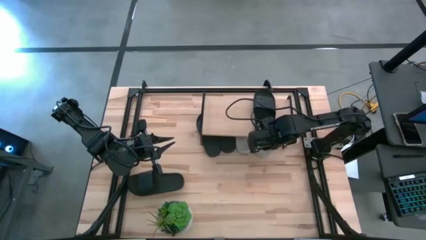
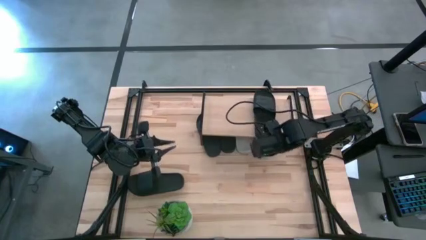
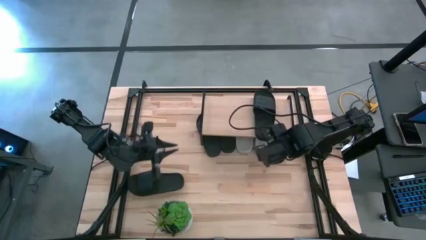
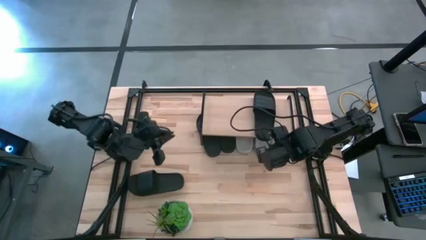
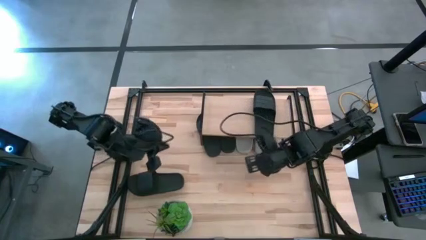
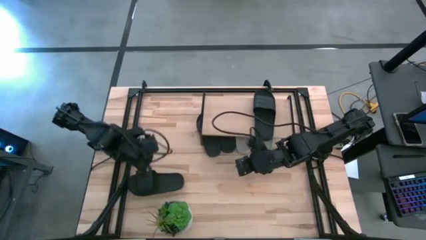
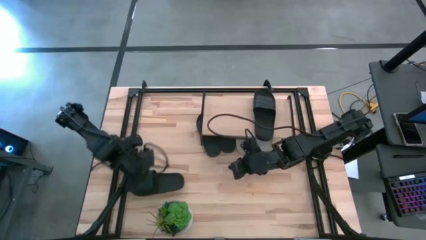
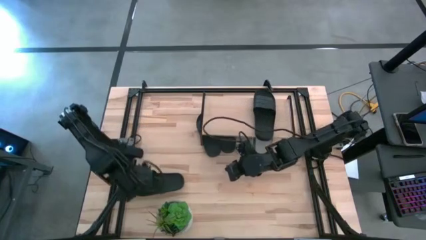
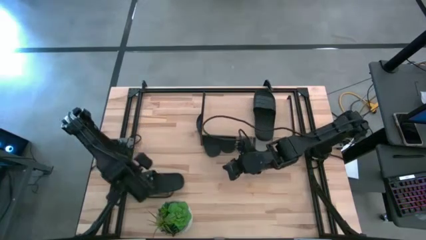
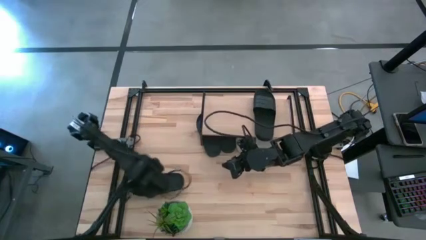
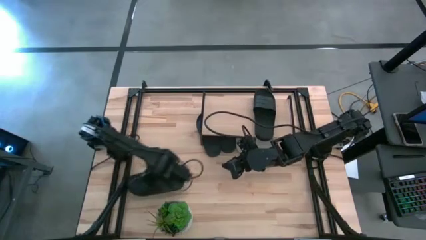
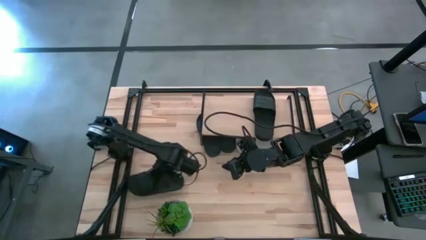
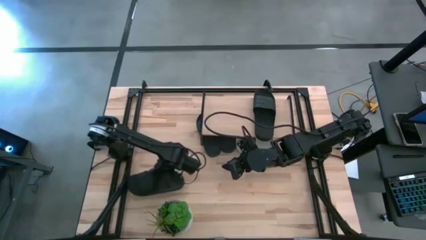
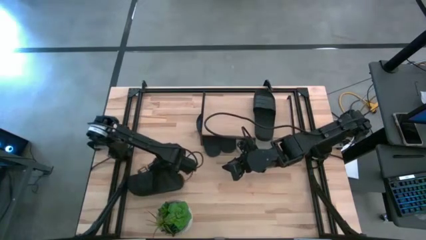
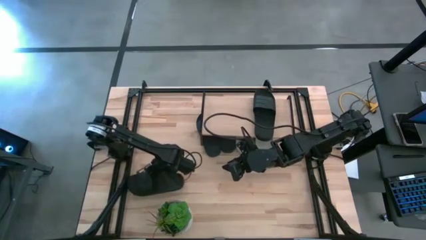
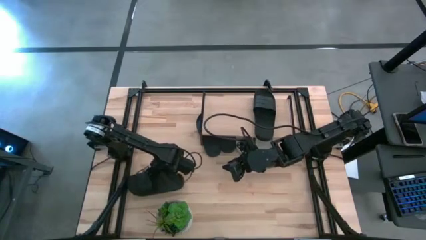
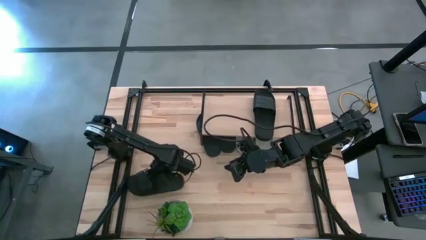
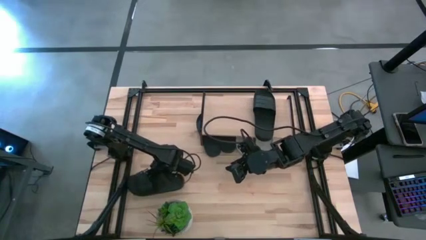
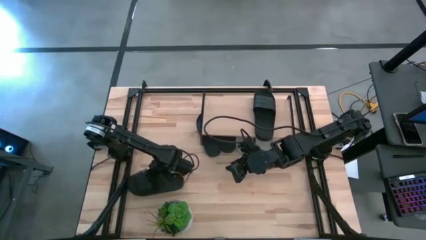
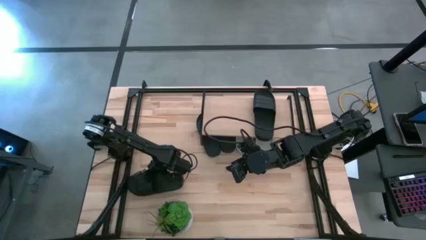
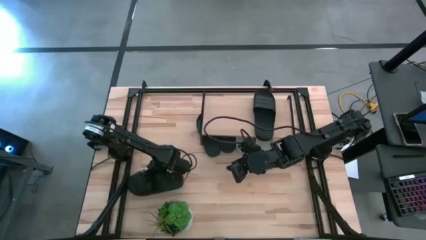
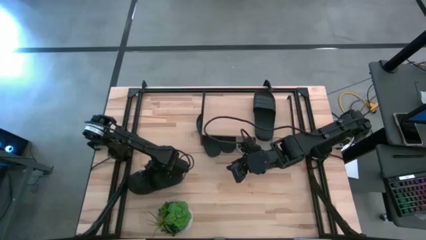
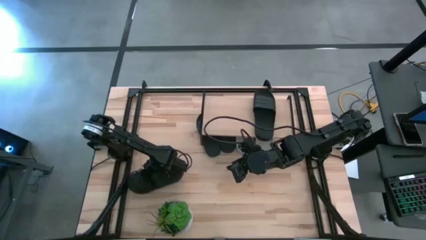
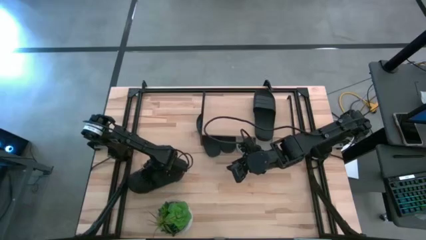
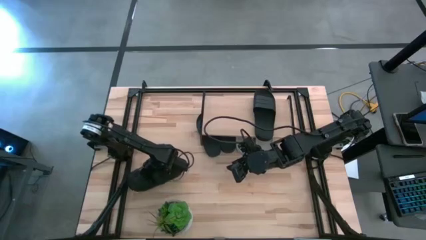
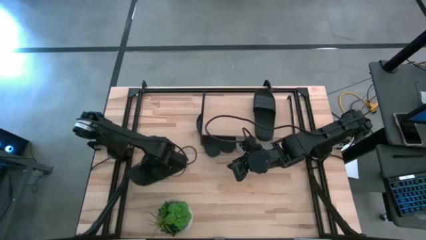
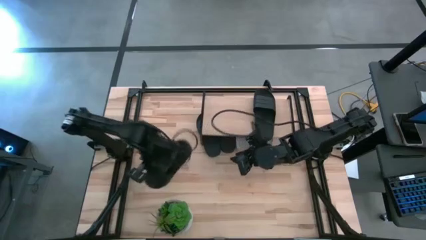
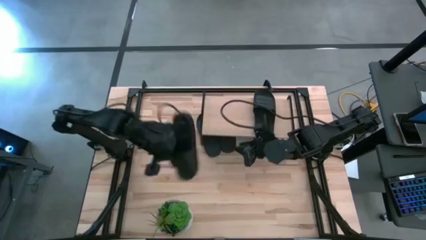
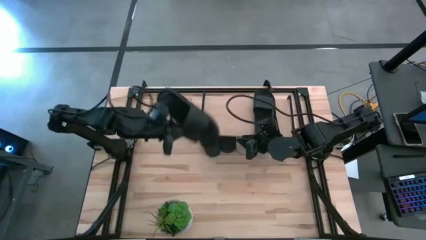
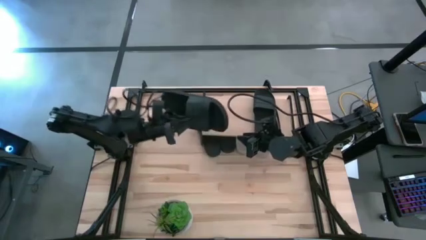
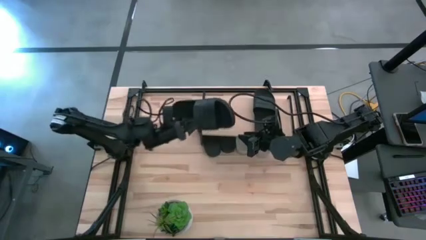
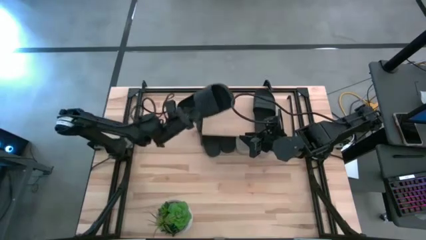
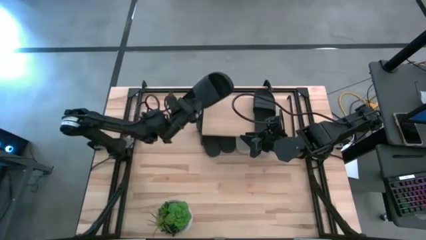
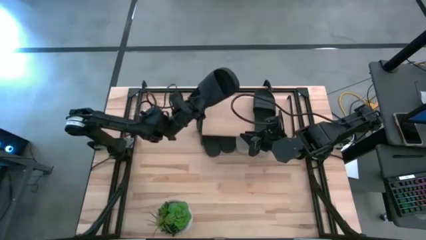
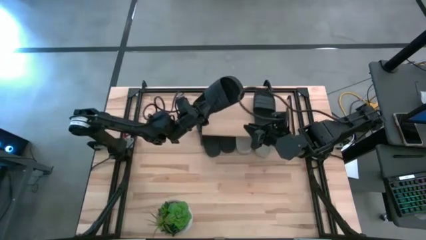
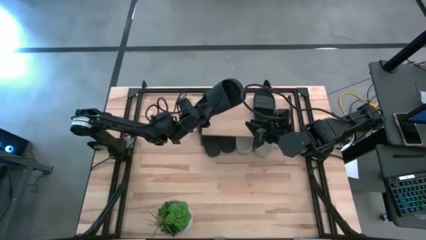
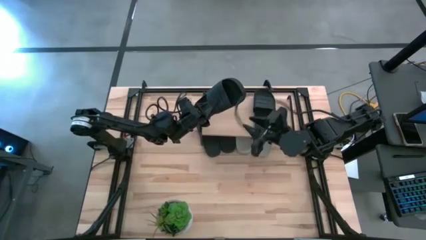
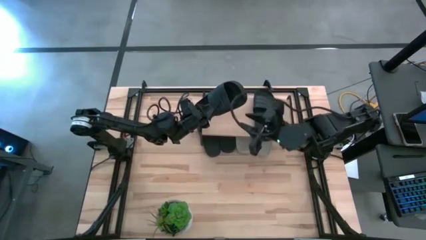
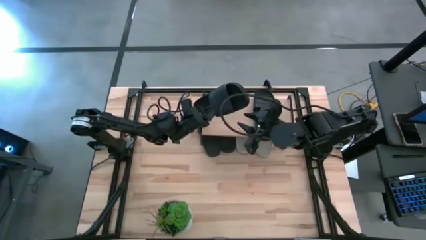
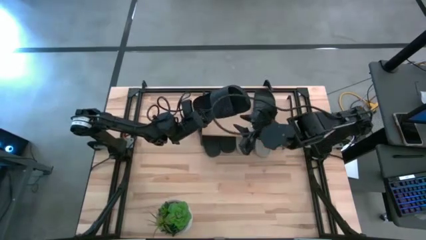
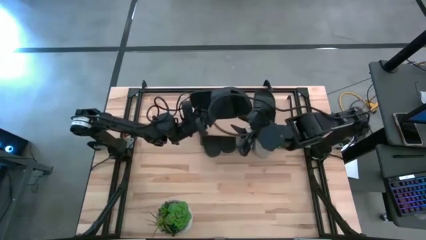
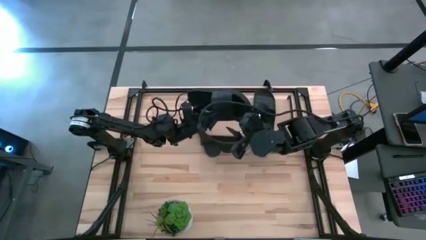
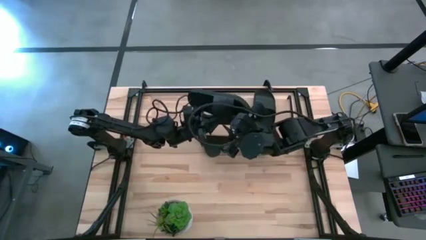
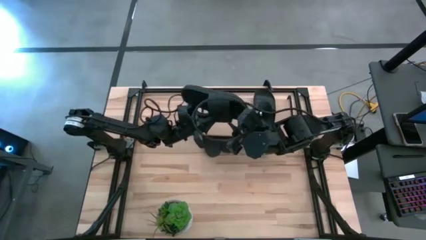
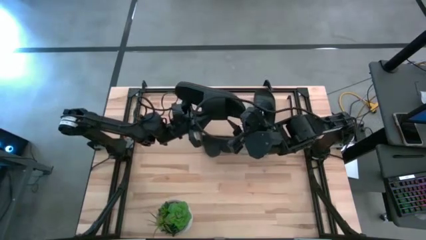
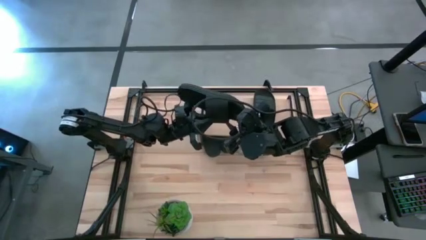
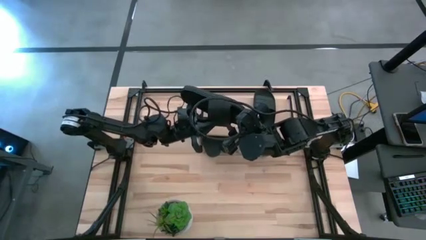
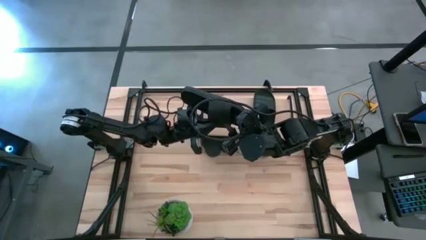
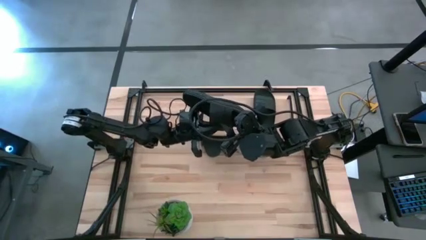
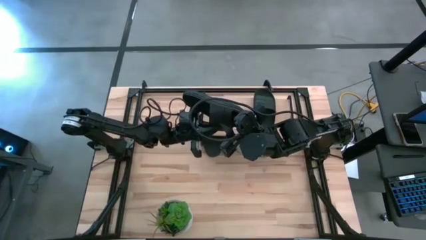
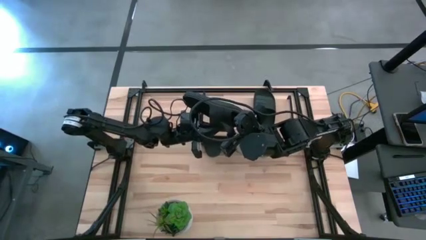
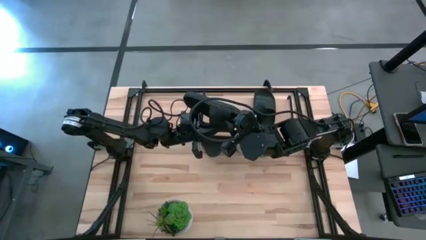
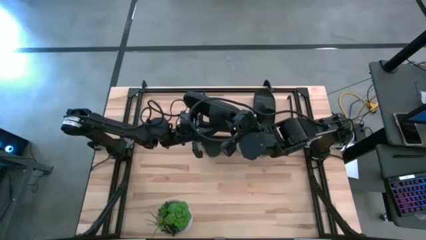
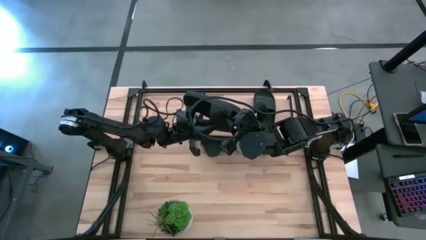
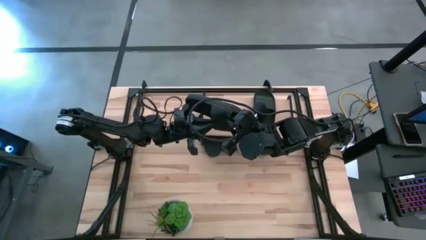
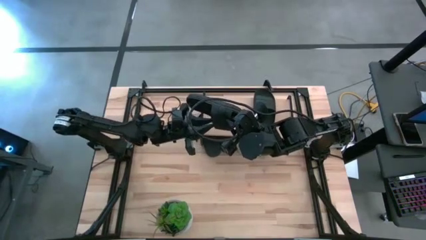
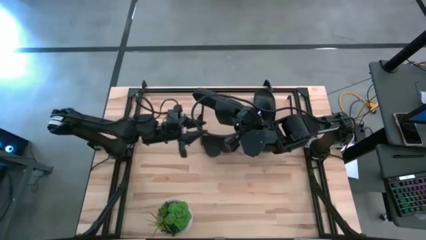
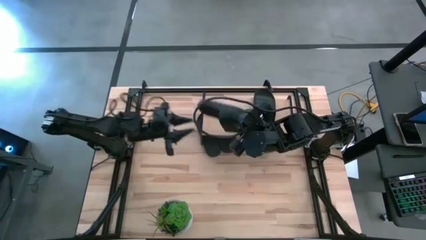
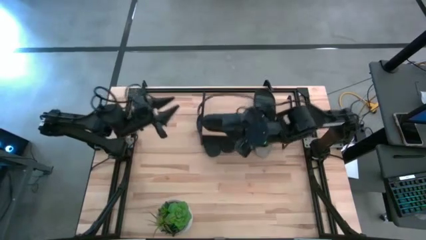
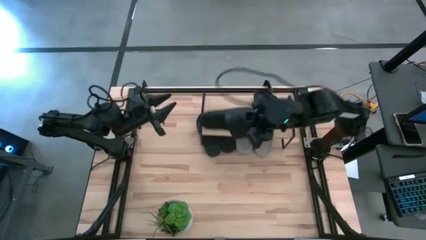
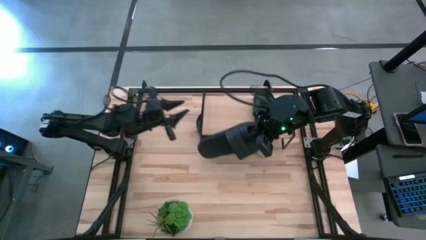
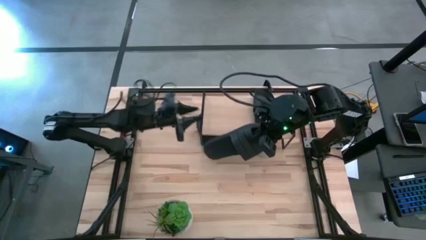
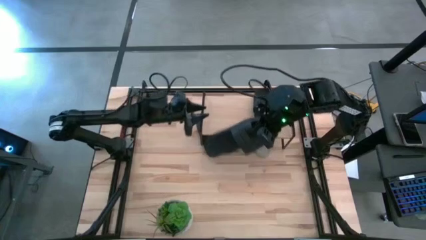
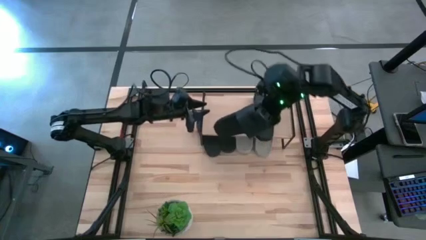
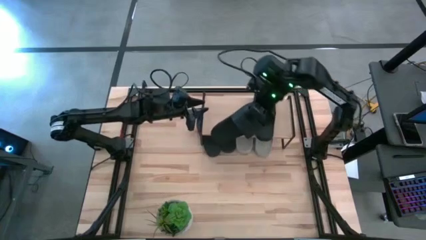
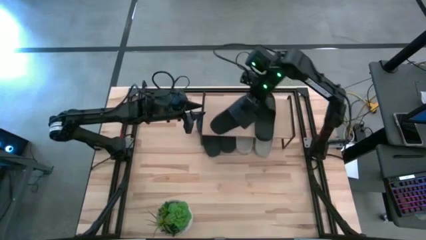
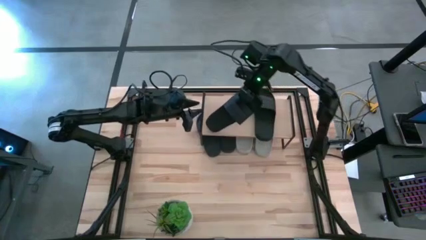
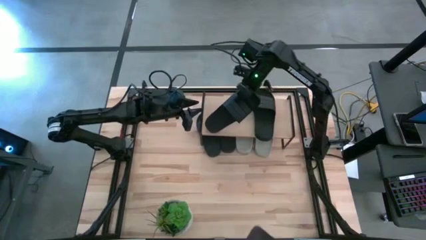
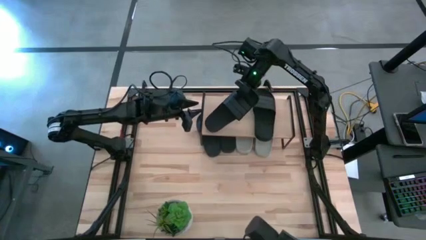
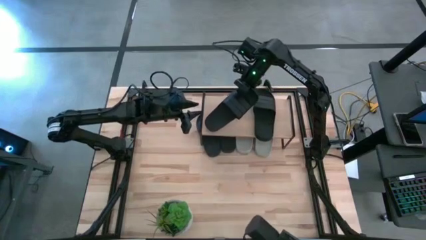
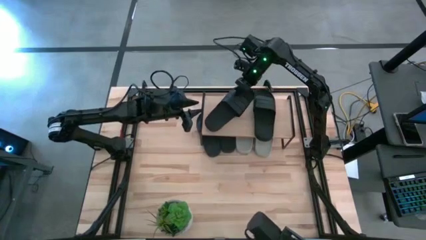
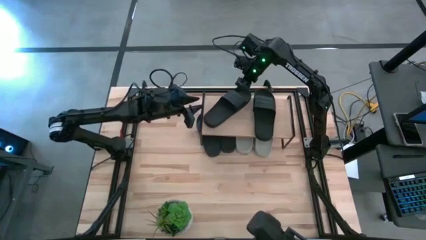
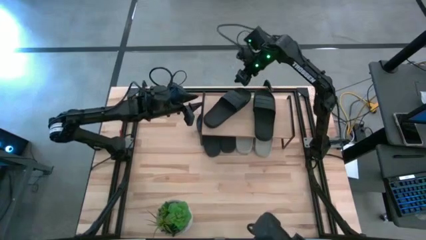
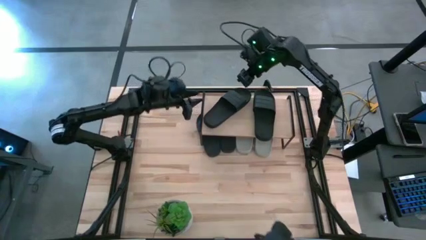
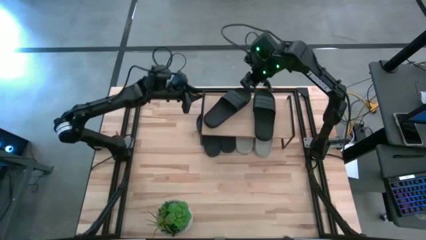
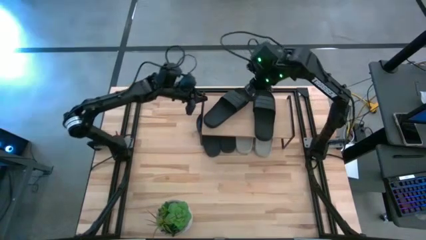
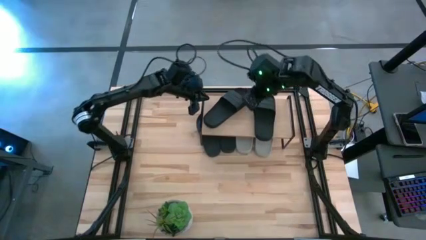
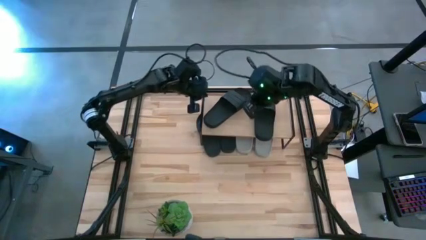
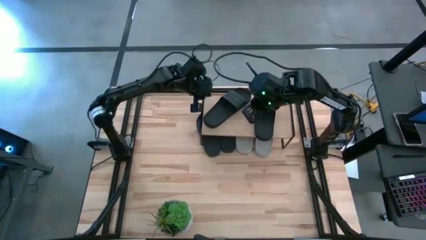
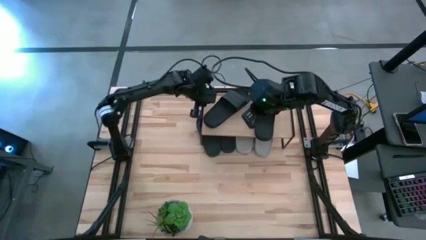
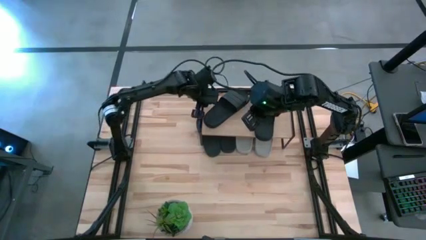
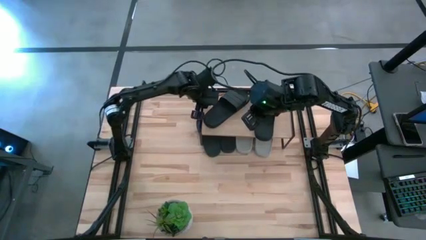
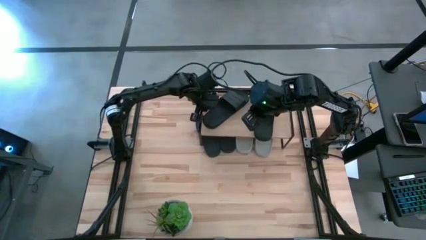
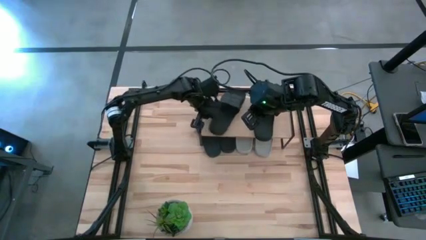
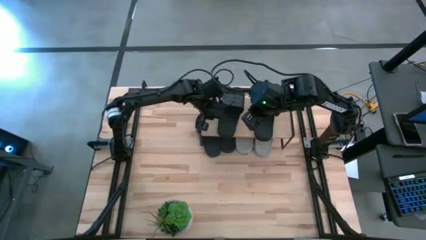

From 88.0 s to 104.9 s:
Task: Pick and place slides into the shelf
Put the black slipper on the shelf
